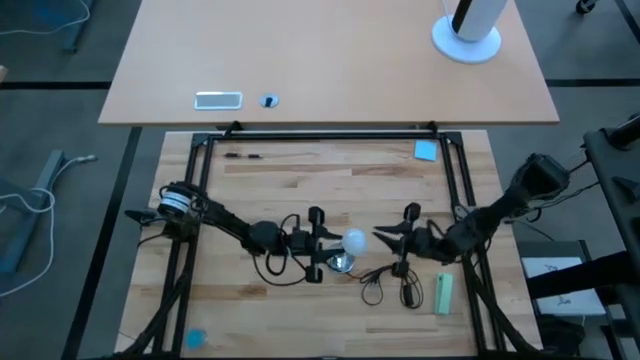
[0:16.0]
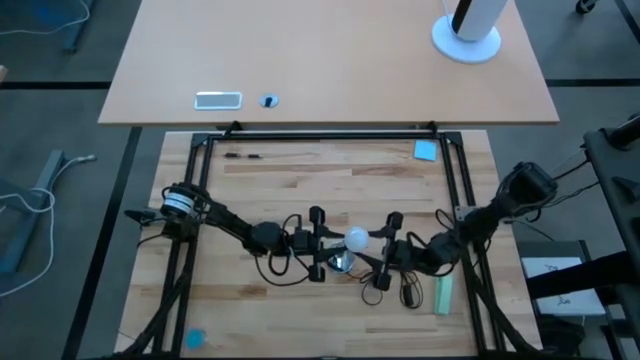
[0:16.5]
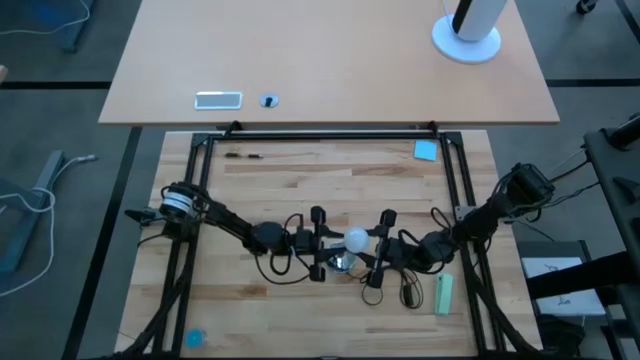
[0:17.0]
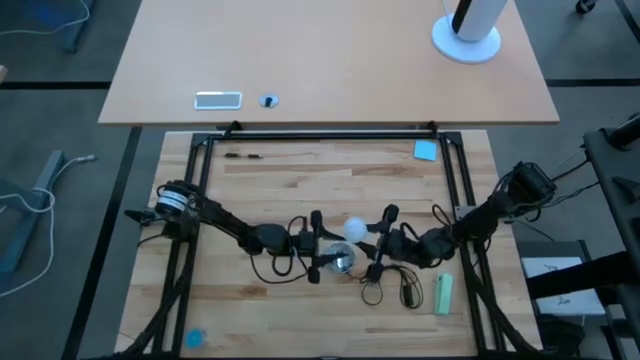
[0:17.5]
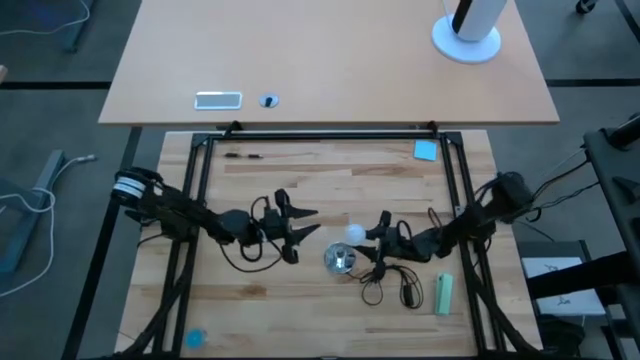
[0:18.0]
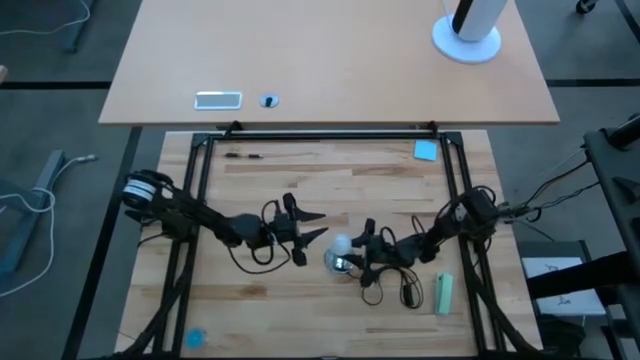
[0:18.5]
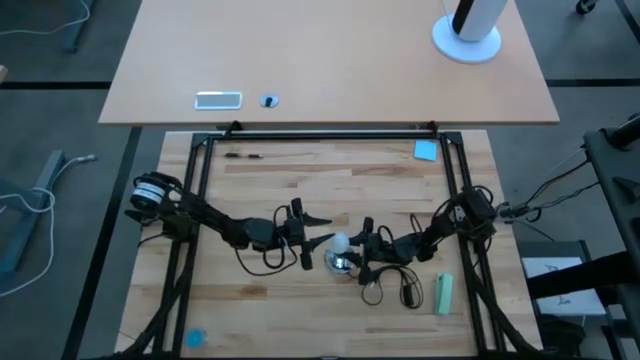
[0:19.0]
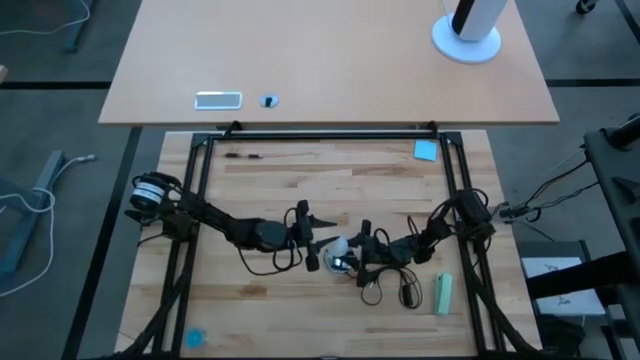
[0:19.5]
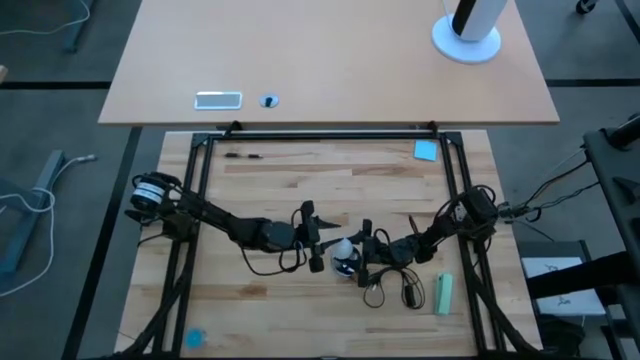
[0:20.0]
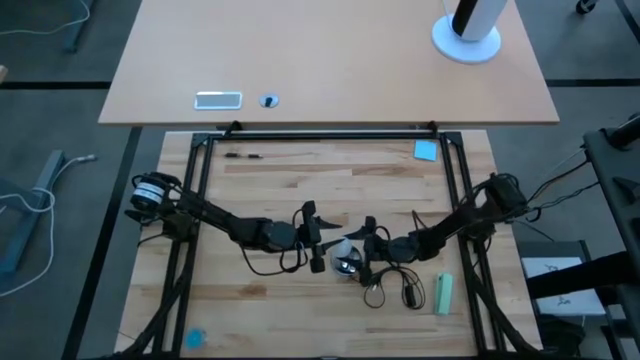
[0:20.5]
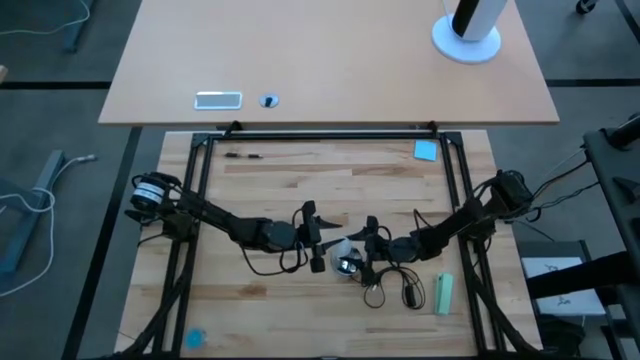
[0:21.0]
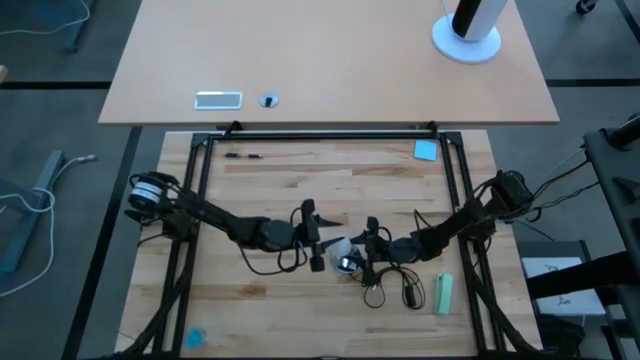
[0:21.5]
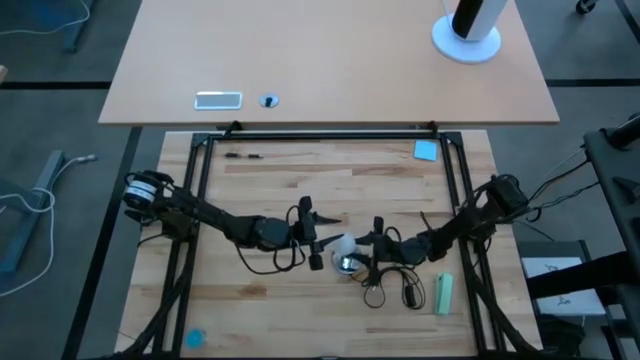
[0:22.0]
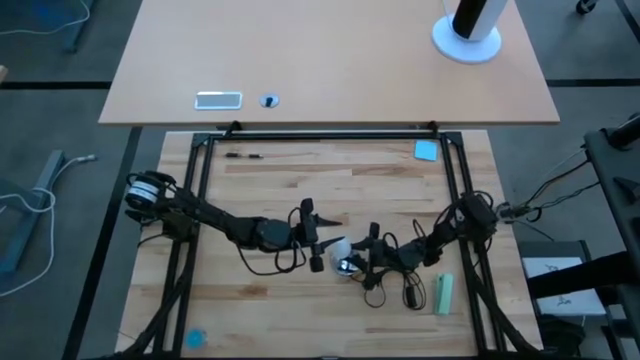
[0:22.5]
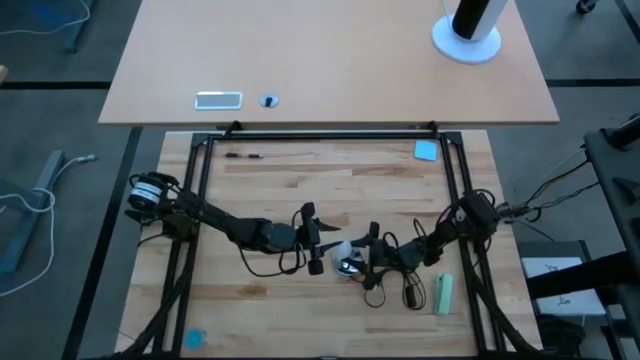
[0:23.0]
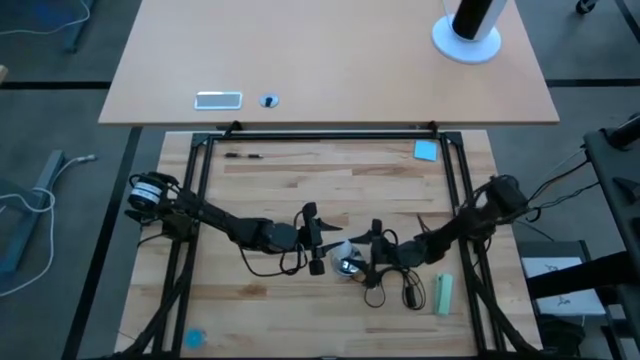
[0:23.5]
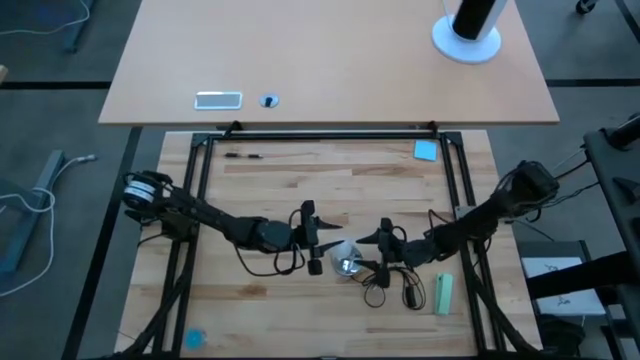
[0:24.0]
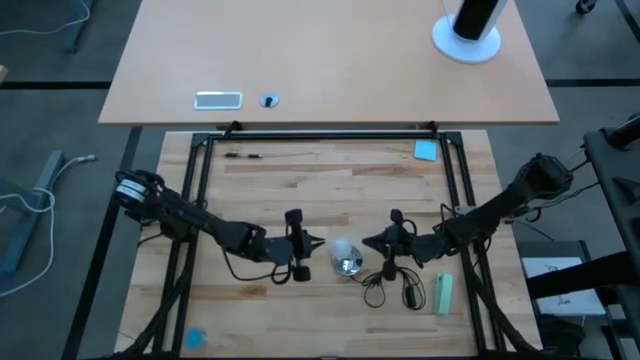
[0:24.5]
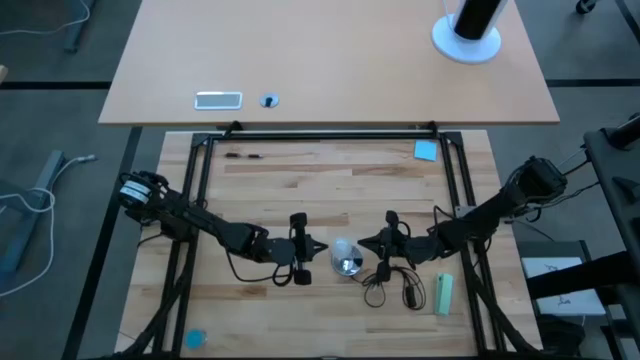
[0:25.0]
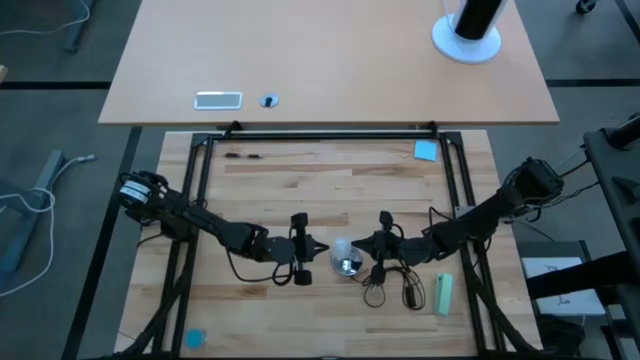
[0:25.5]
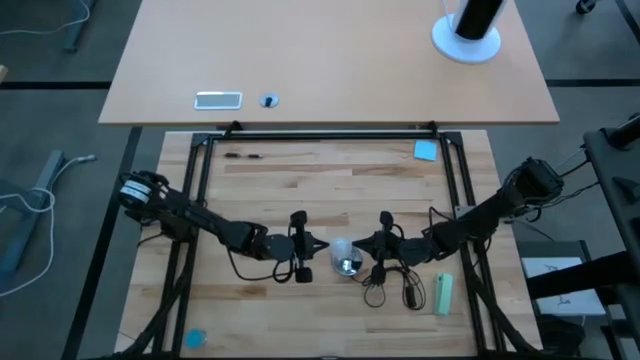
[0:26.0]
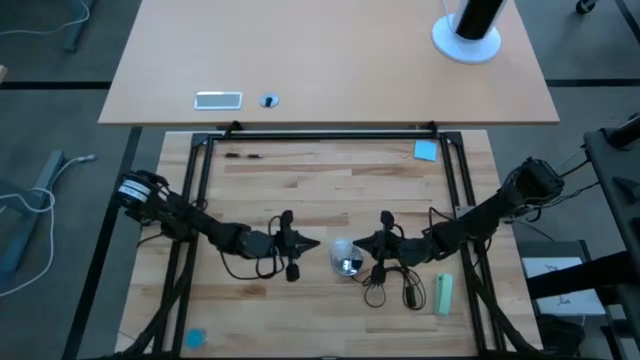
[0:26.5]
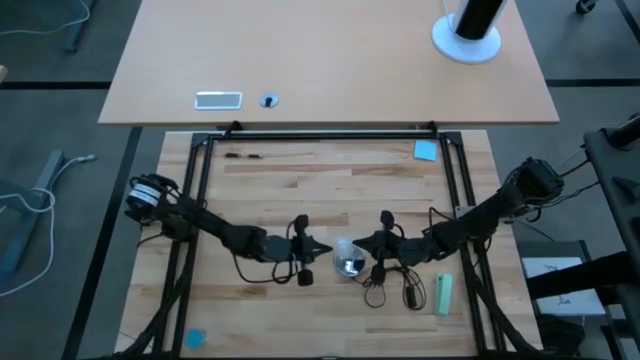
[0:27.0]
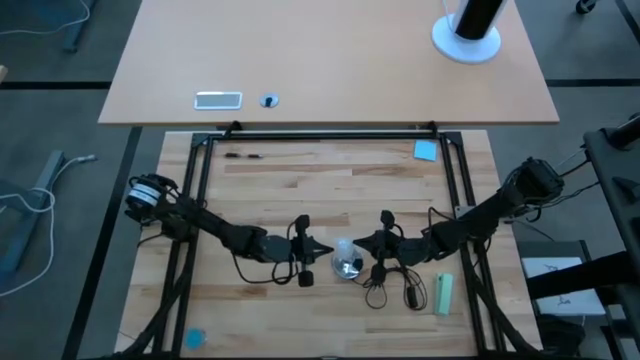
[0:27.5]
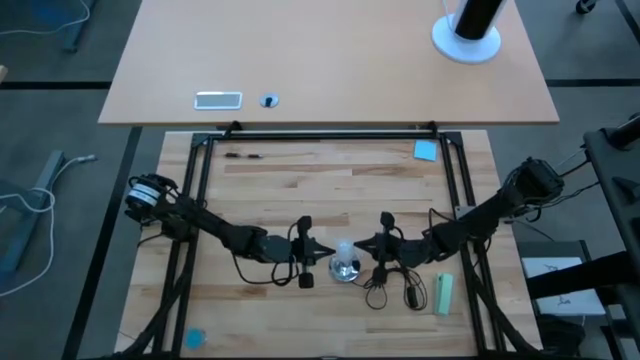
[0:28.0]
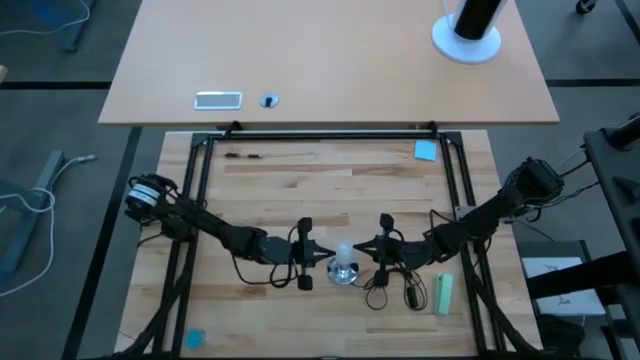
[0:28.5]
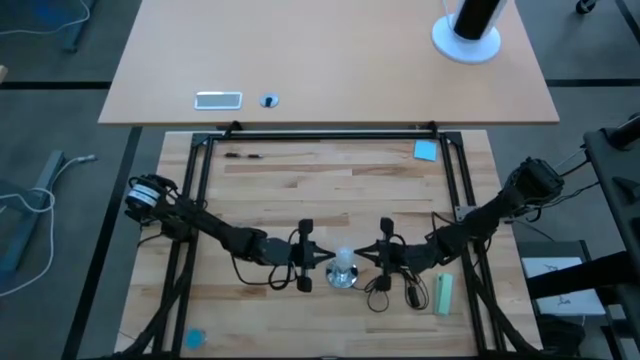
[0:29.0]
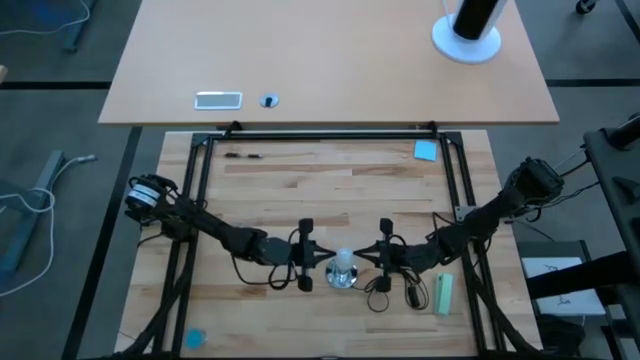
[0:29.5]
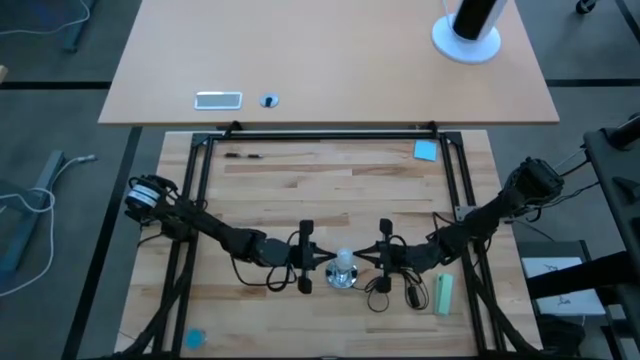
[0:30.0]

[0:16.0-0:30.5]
Task: Screw lightbulb
Insert the lightbulb into the lamp

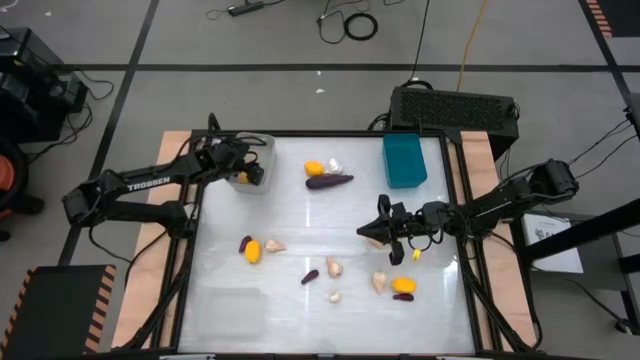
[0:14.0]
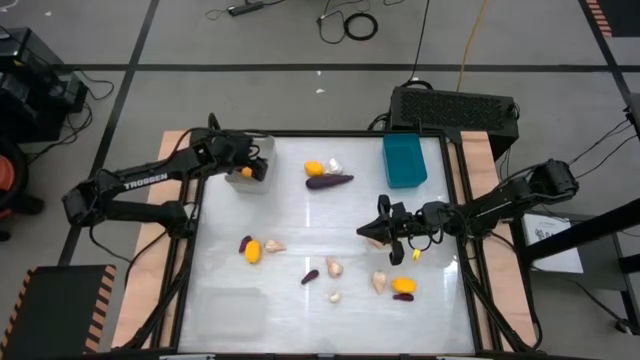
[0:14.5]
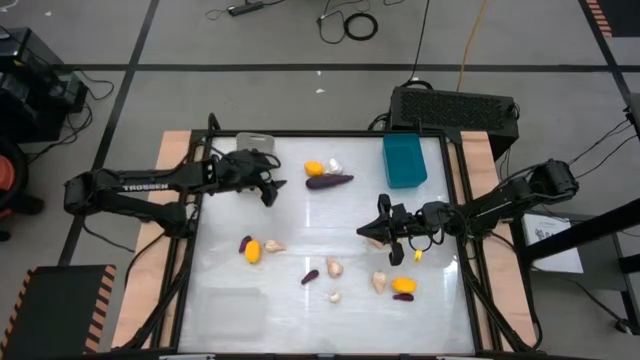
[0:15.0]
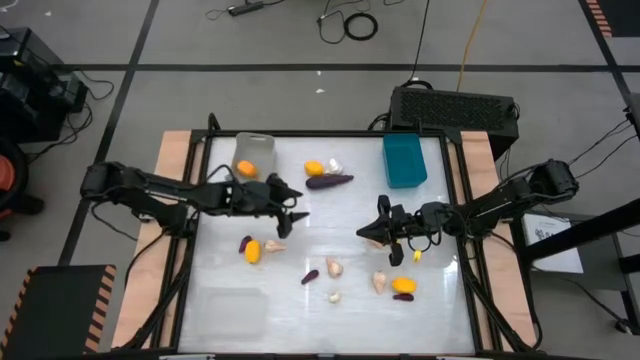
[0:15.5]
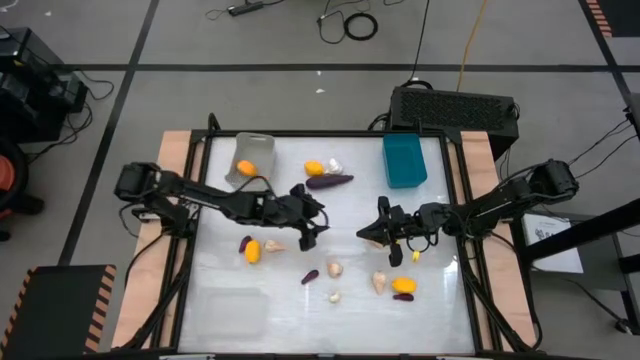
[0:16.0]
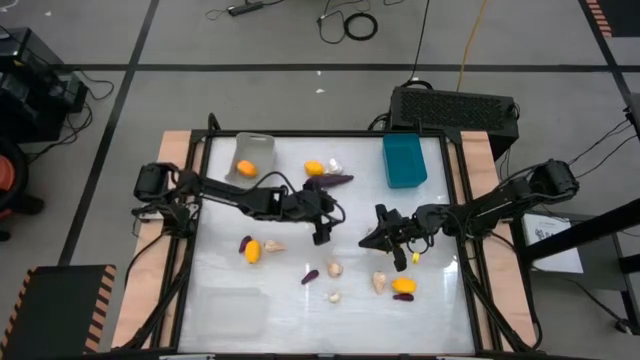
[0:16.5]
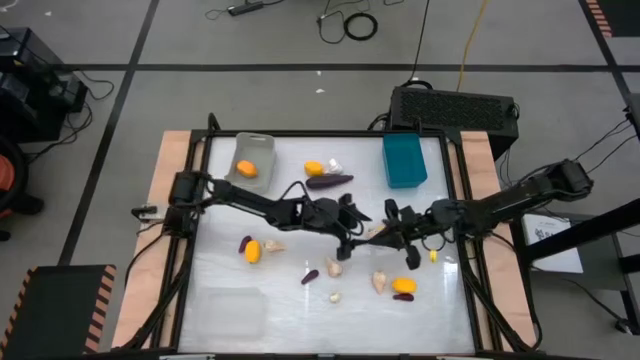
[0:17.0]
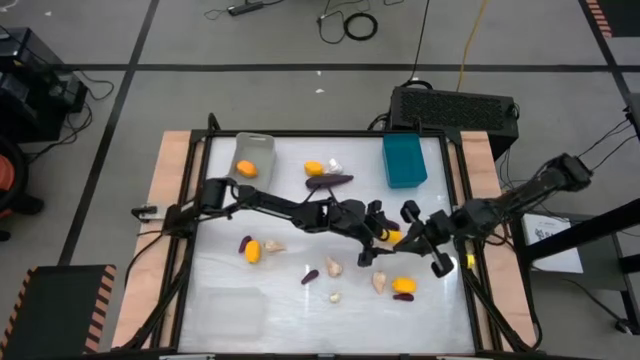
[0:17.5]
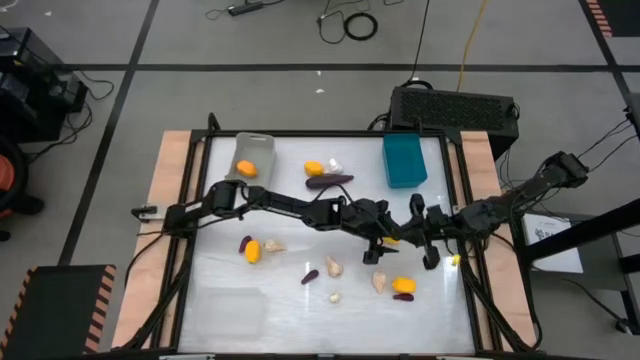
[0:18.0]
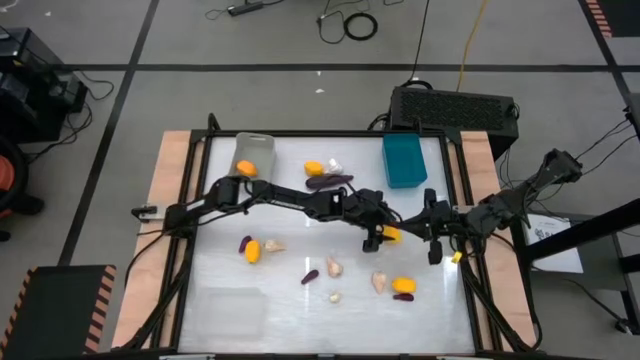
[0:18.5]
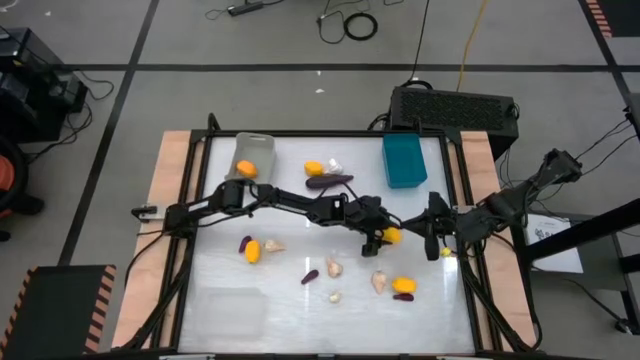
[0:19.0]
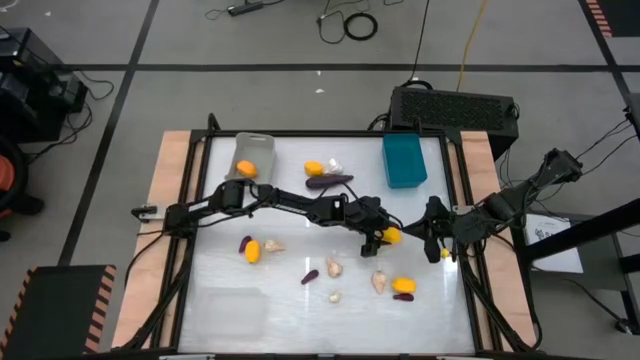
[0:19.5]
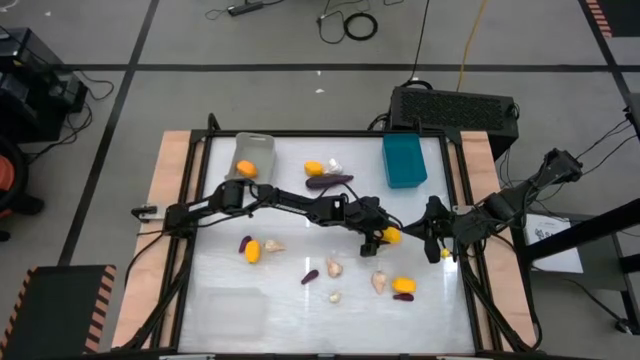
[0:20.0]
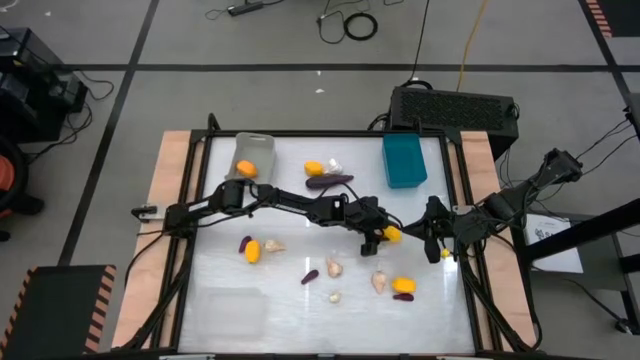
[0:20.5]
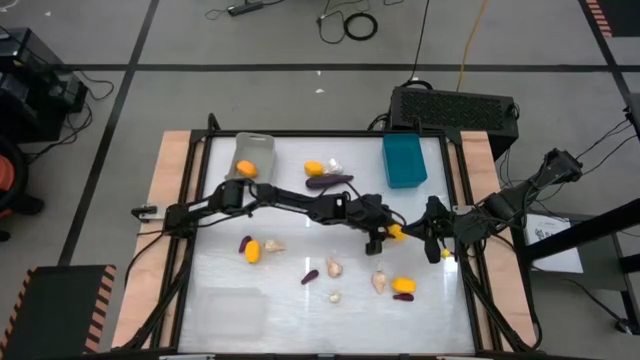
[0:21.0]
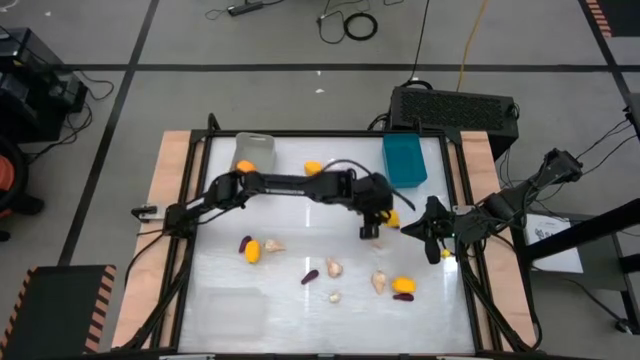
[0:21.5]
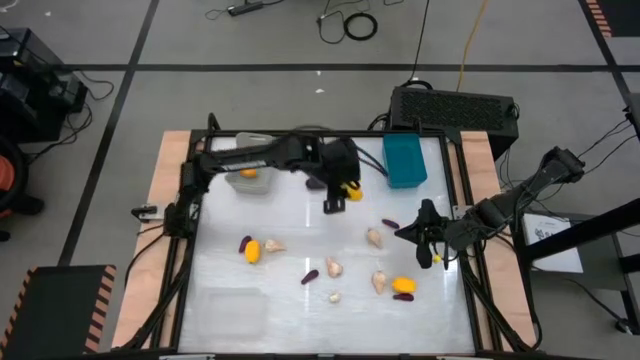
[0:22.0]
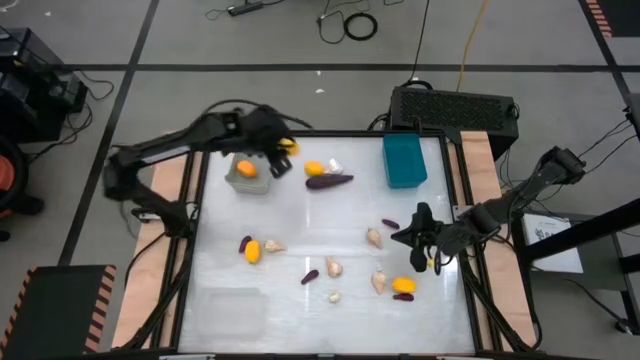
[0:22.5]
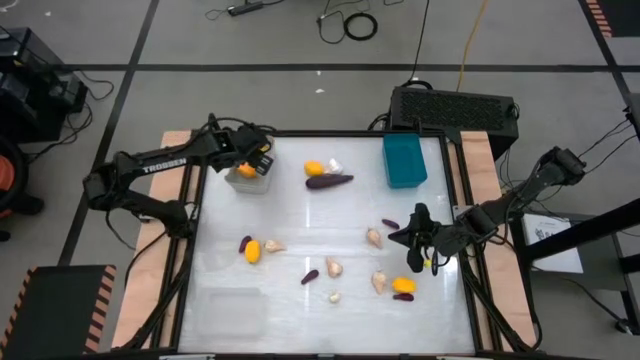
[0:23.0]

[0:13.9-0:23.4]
Task: Sort produce into baskets
Put the lemon into the gray bin
